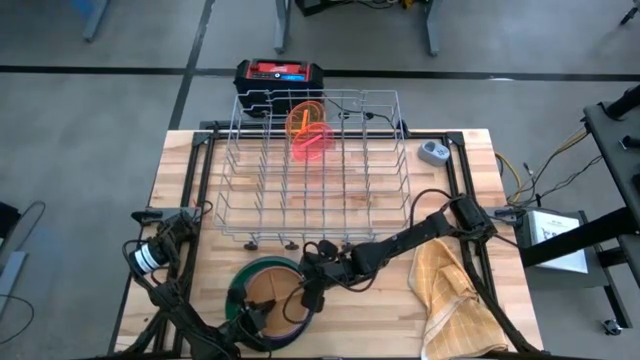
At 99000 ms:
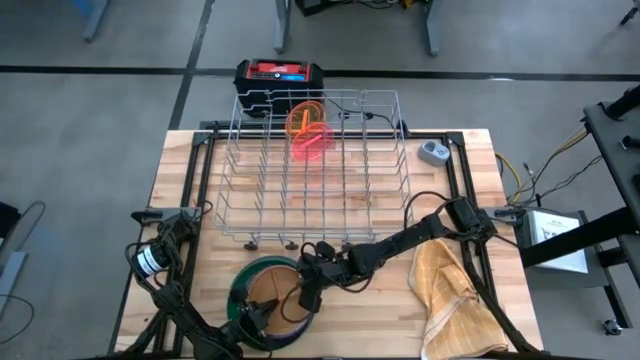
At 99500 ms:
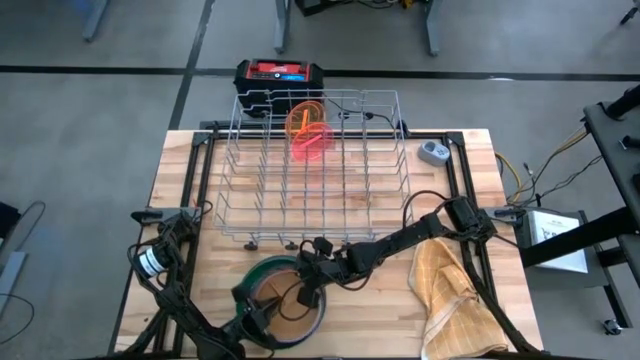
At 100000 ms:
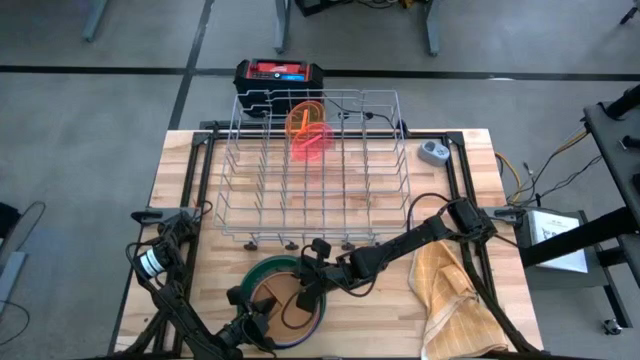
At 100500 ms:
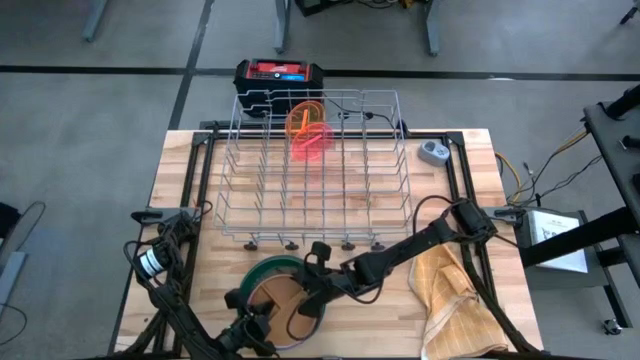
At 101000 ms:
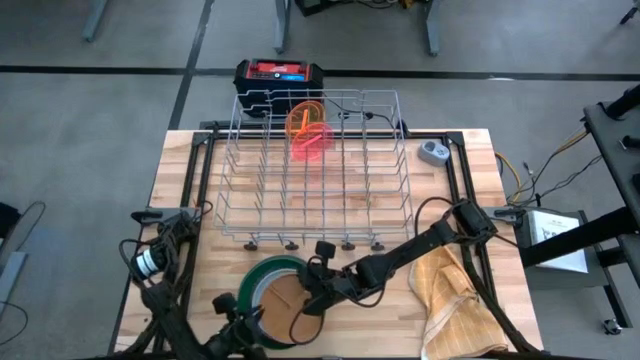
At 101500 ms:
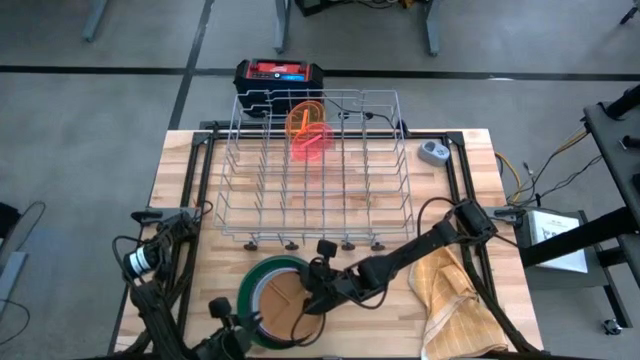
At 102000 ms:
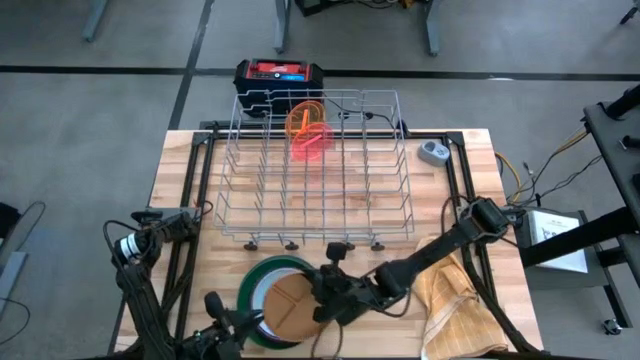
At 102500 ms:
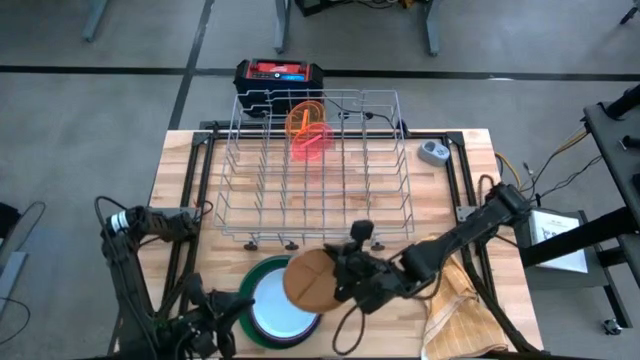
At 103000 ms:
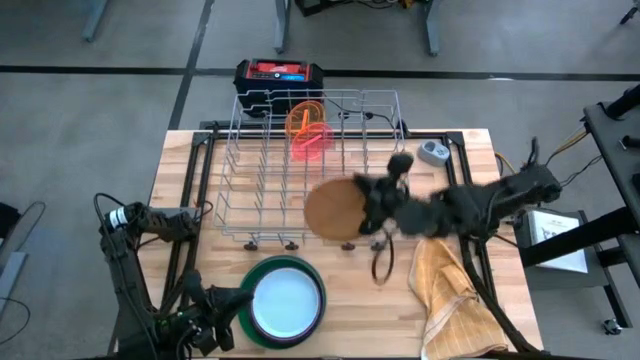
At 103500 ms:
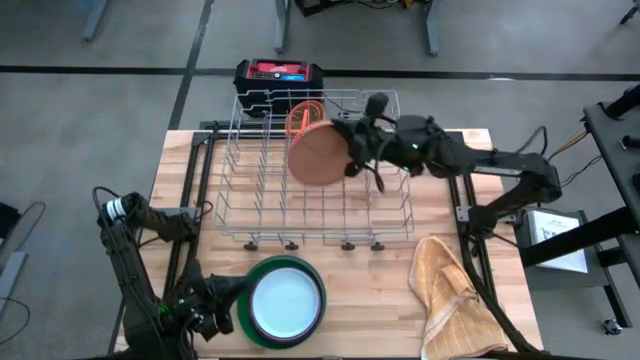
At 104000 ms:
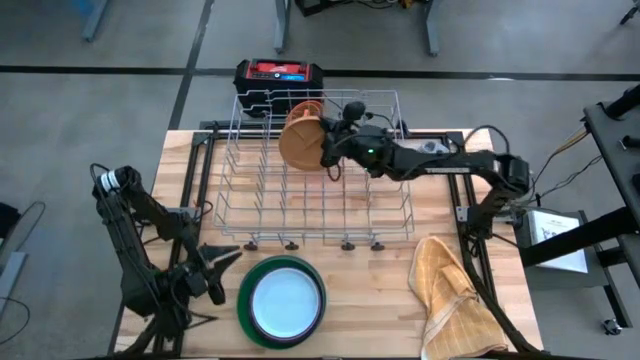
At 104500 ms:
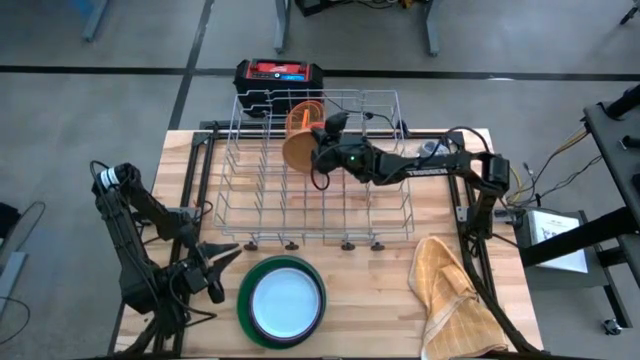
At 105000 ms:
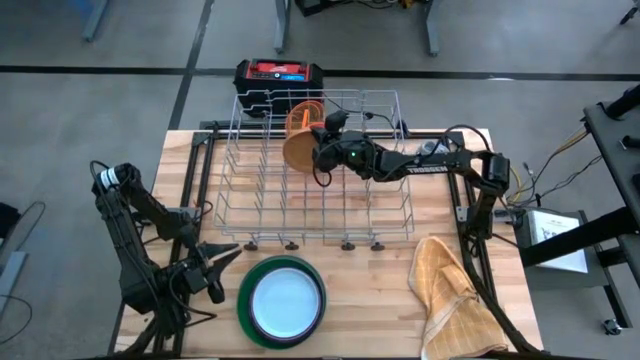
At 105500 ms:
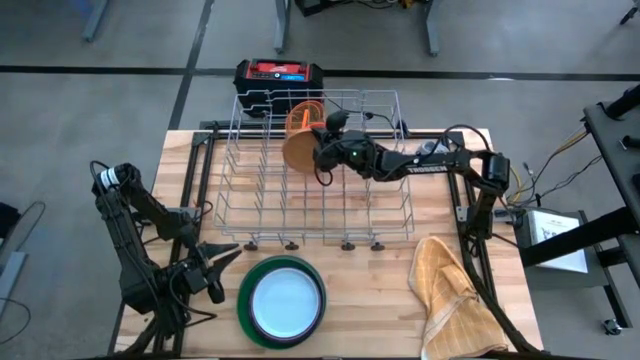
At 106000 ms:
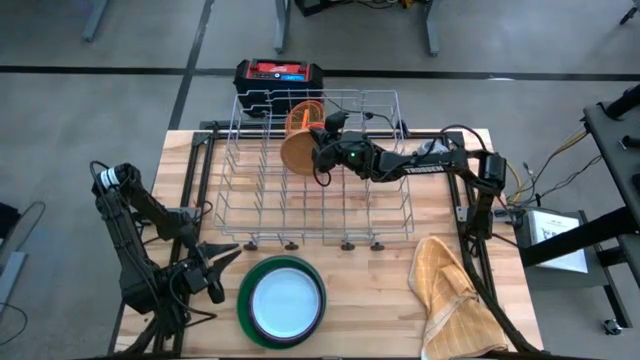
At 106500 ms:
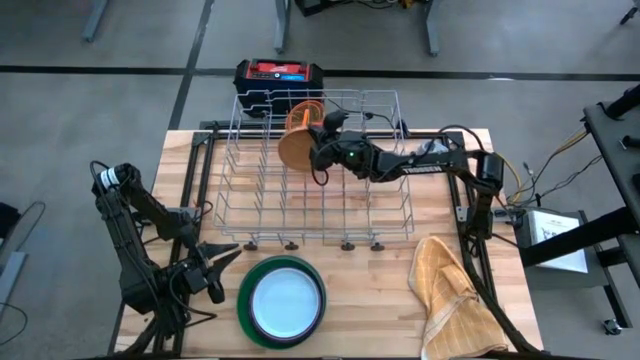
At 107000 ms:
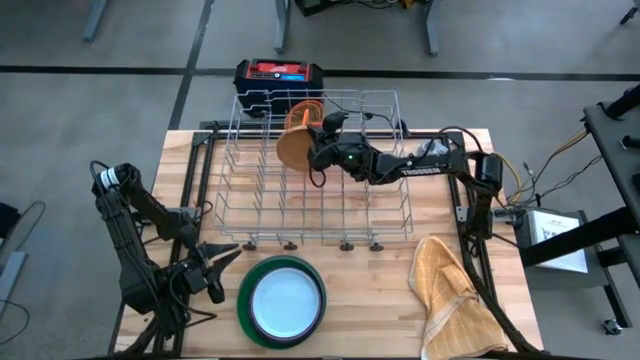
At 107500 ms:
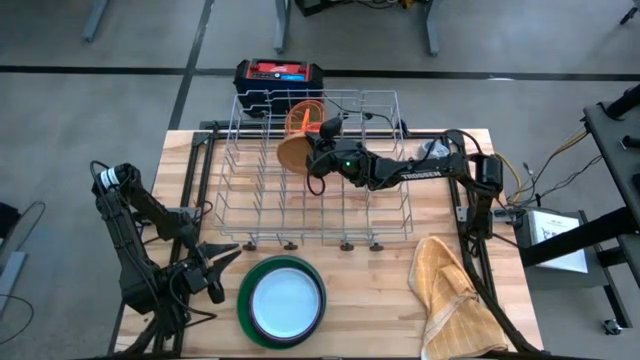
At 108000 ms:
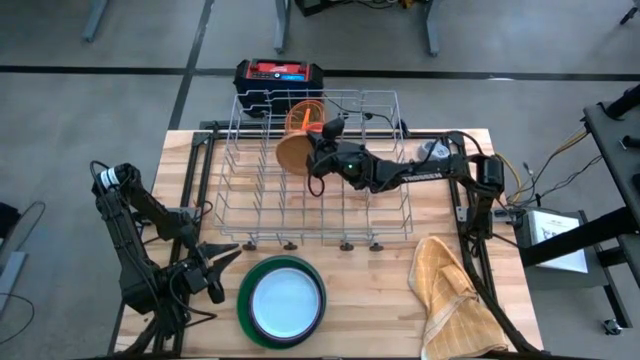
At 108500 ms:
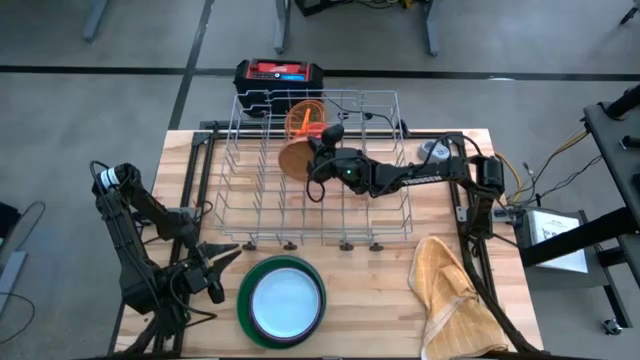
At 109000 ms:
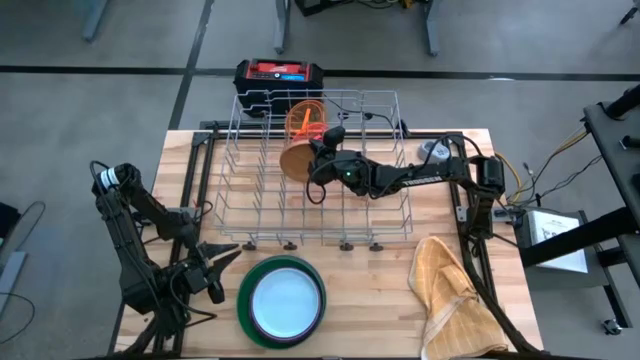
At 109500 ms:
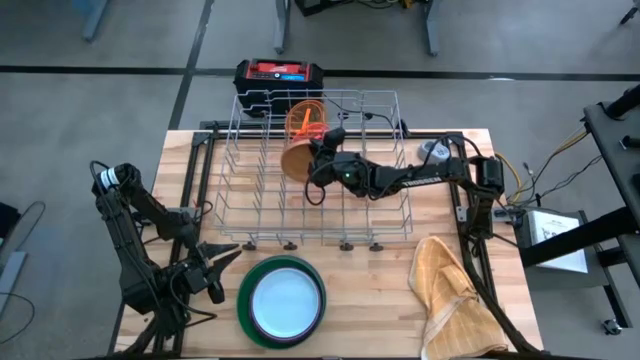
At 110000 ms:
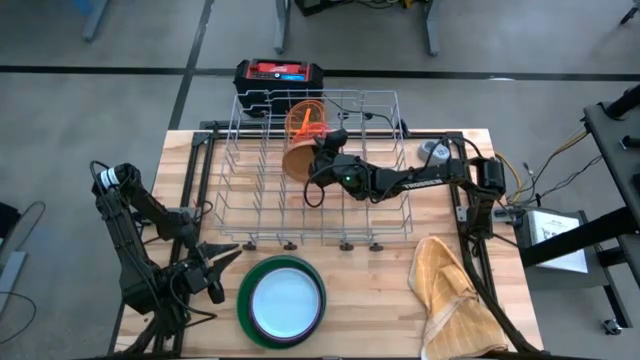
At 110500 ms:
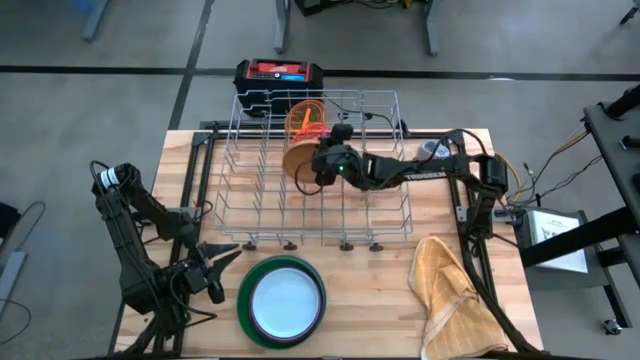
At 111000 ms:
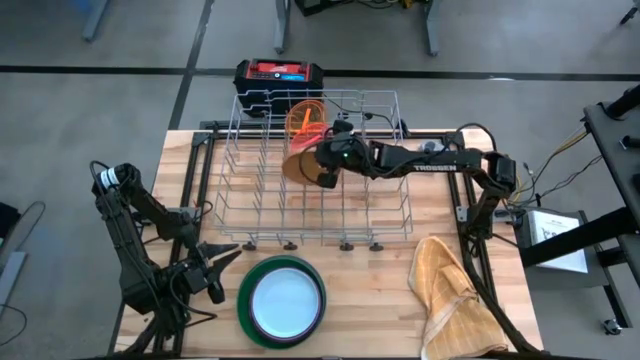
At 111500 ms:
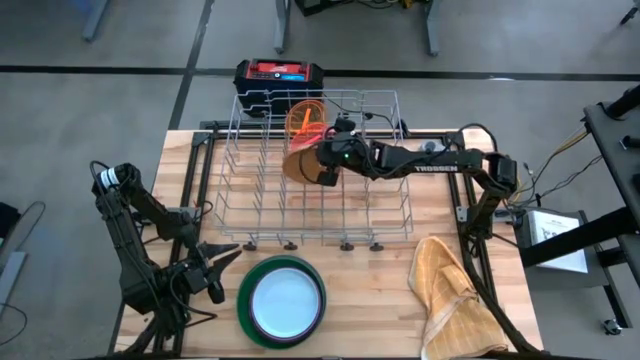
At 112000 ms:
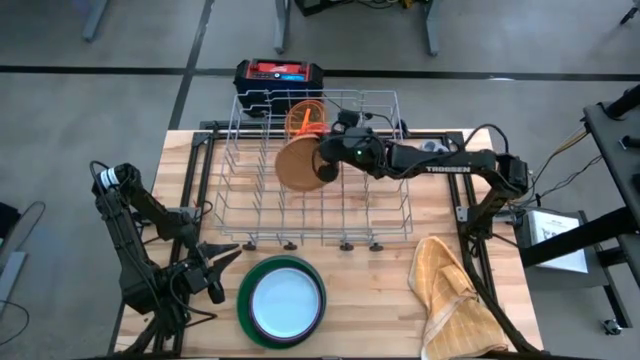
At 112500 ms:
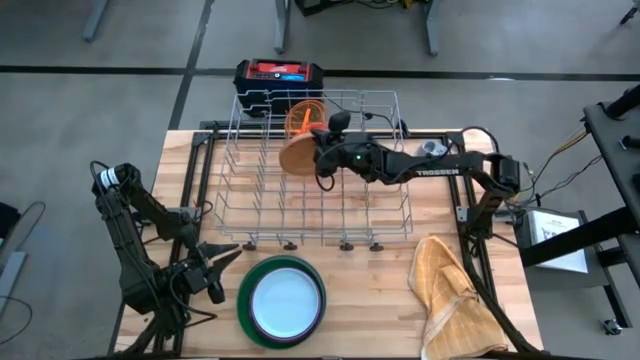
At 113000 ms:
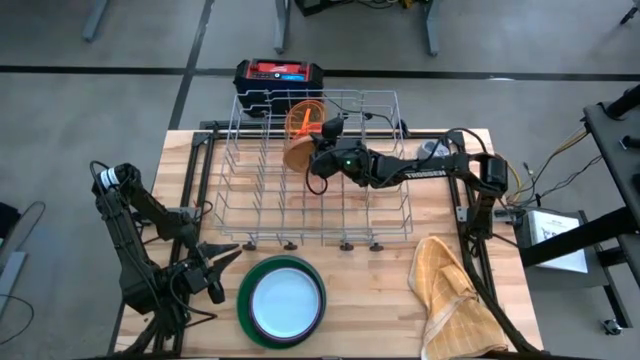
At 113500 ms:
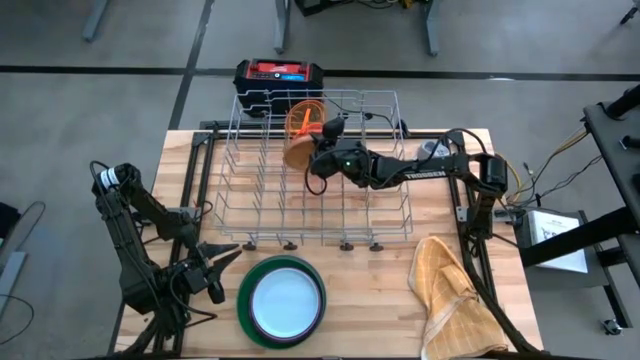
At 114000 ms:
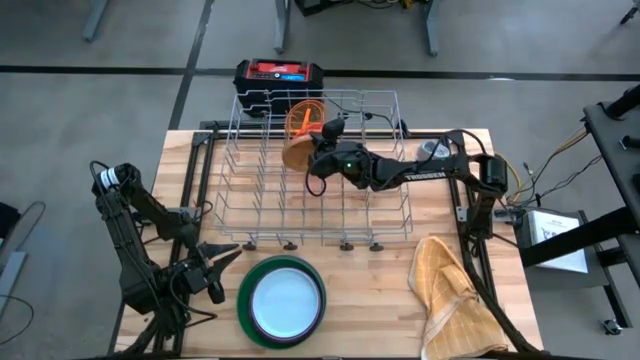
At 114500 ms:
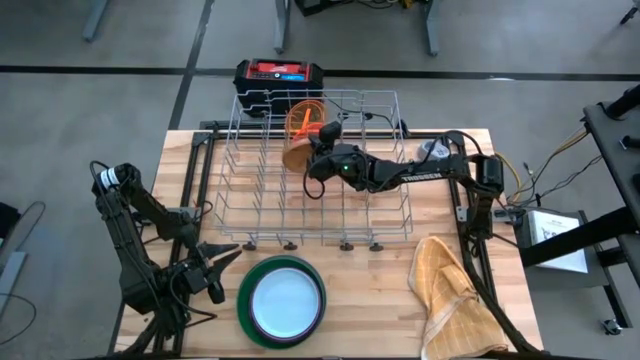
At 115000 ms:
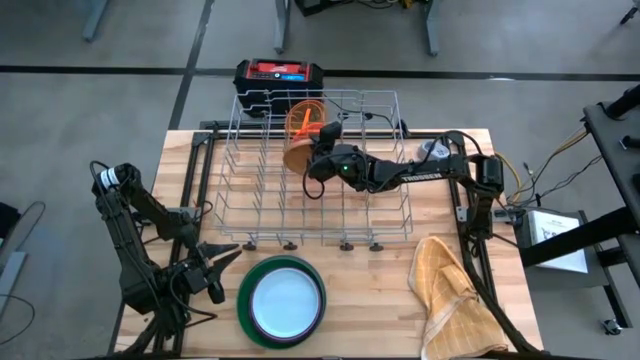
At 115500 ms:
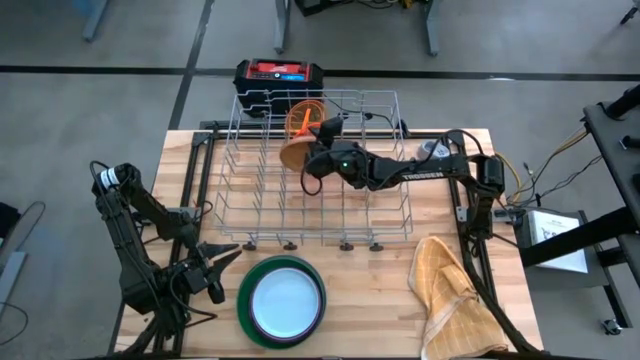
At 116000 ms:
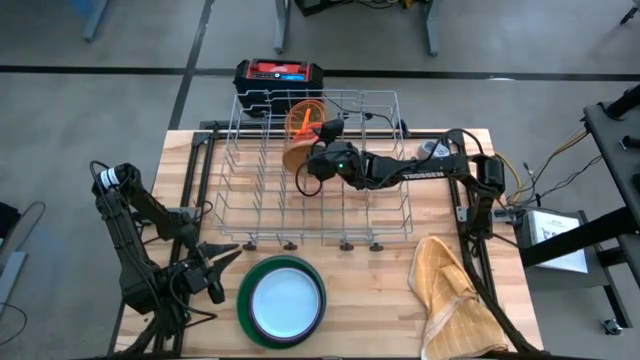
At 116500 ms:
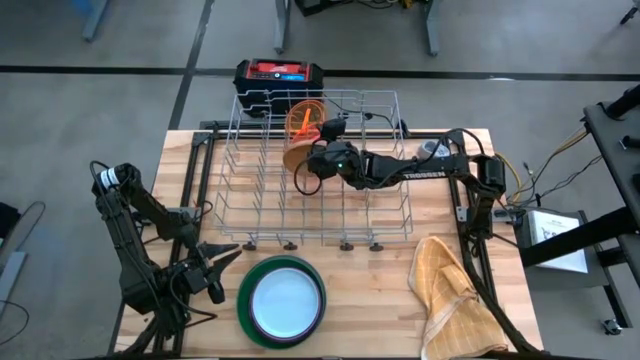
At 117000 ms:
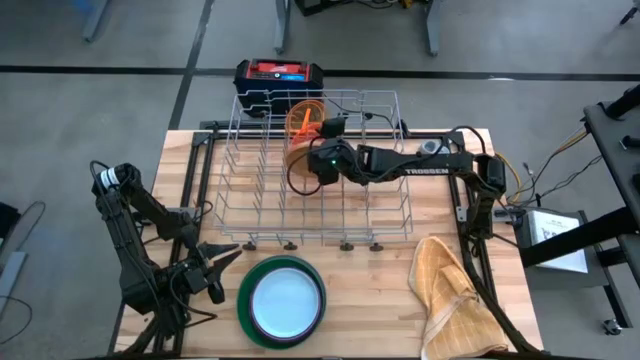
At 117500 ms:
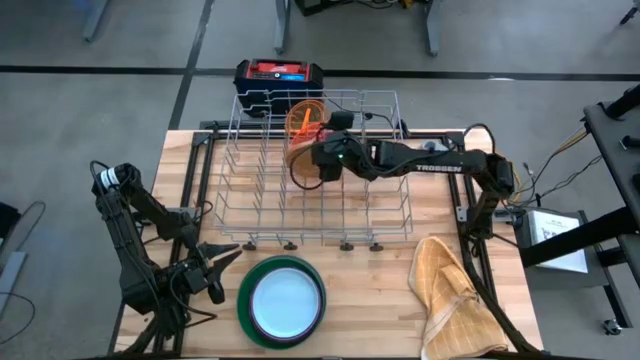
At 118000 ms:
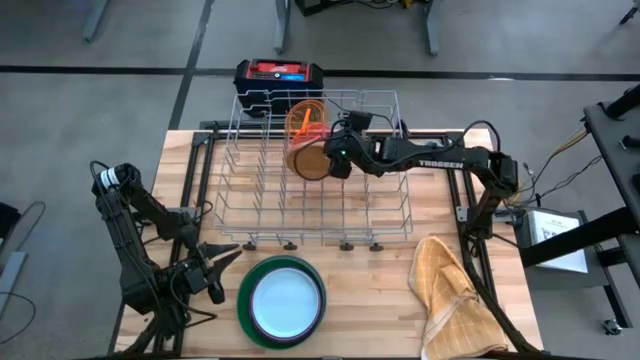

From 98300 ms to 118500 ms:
Task: Sort dishes
Put the brown plate into the dish rack

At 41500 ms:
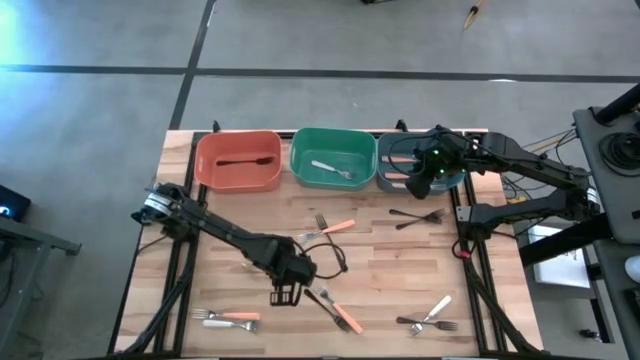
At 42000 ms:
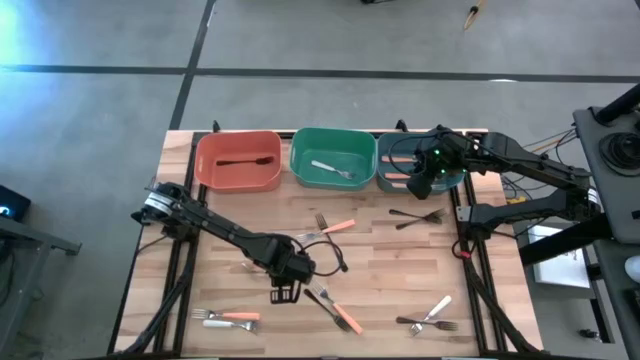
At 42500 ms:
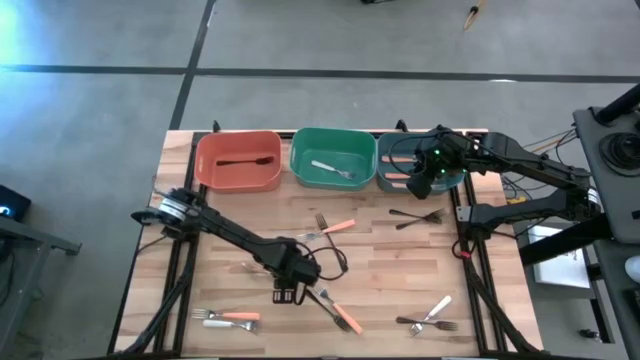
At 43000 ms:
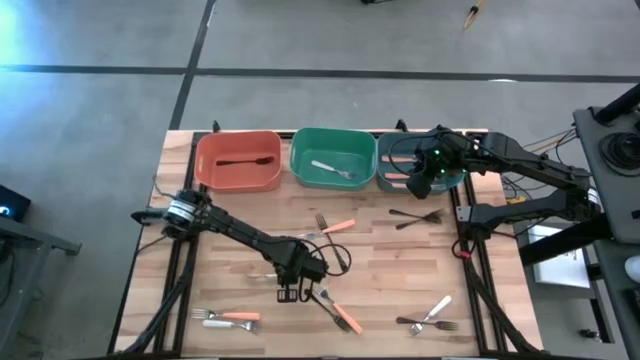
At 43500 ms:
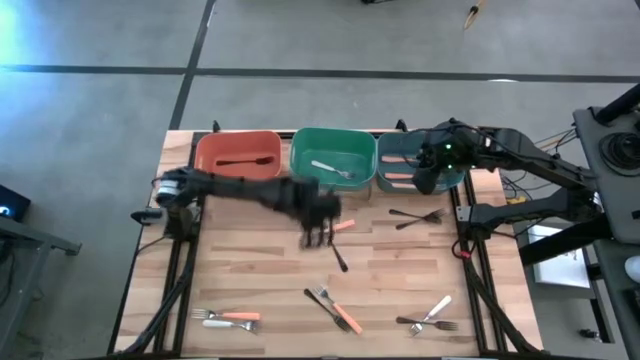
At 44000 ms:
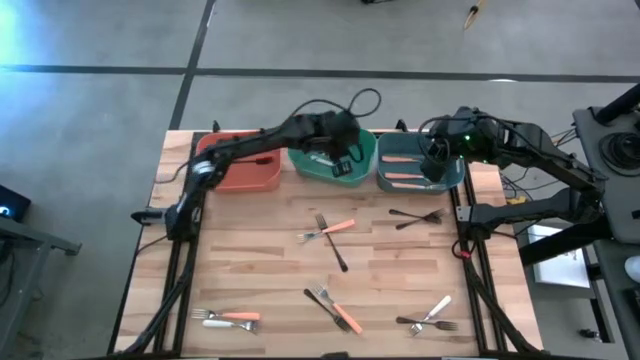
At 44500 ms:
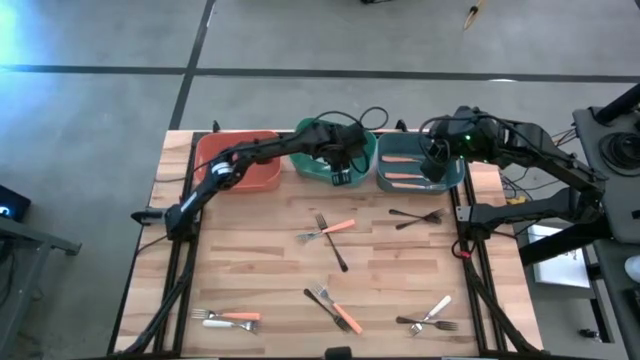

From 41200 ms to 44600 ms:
Task: Sort silverware by color (type)
Put the white fork into the green bin
